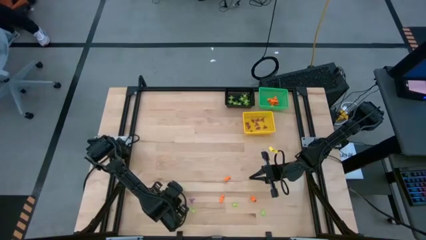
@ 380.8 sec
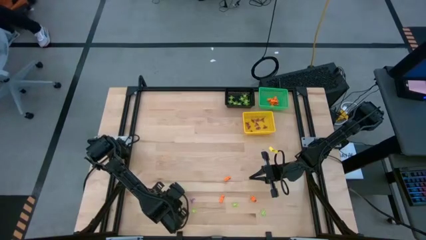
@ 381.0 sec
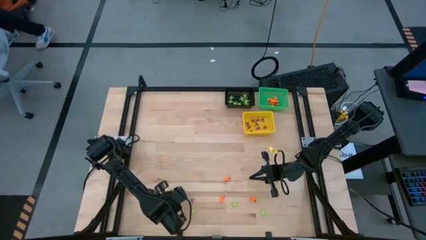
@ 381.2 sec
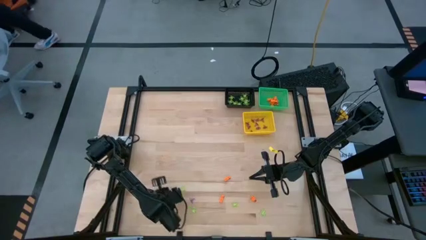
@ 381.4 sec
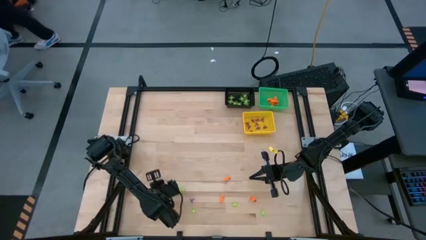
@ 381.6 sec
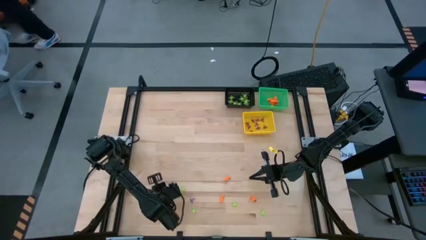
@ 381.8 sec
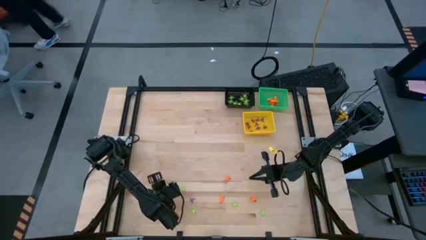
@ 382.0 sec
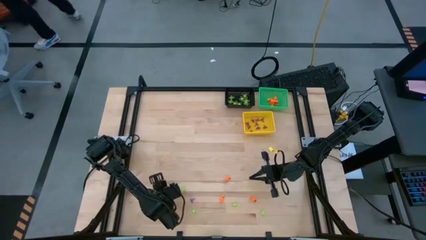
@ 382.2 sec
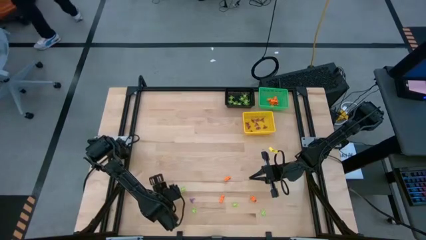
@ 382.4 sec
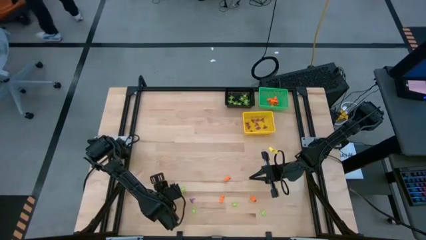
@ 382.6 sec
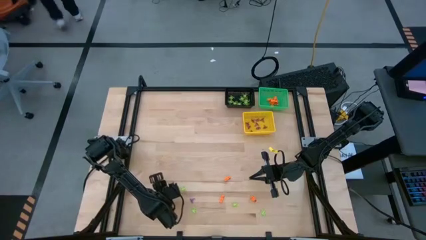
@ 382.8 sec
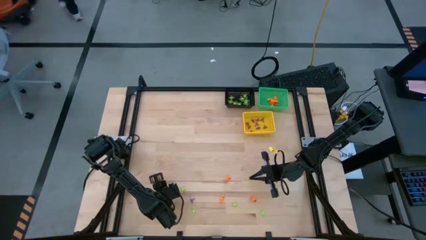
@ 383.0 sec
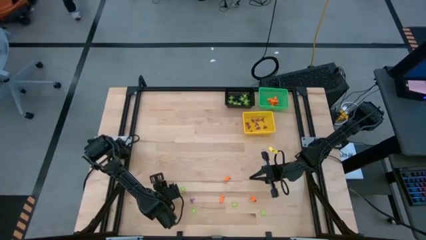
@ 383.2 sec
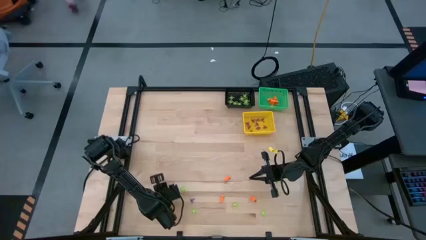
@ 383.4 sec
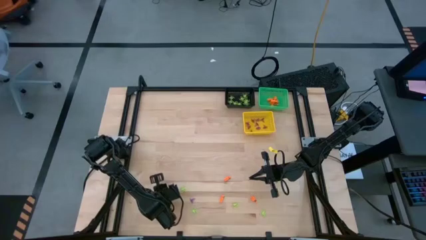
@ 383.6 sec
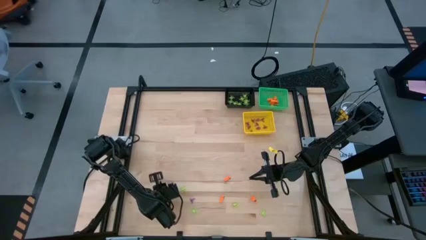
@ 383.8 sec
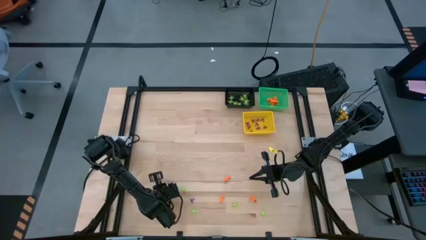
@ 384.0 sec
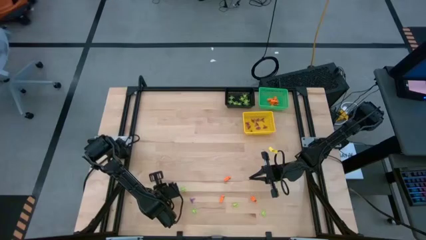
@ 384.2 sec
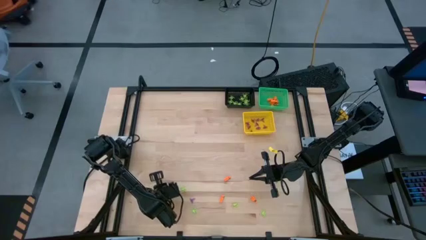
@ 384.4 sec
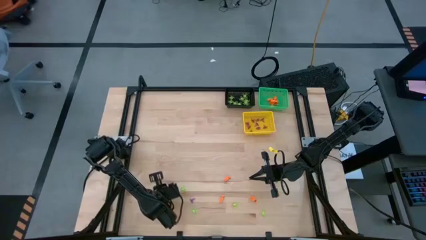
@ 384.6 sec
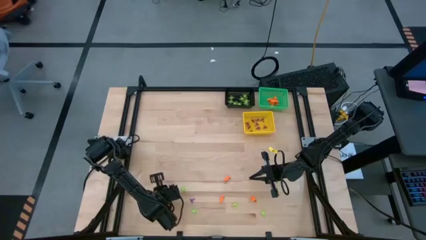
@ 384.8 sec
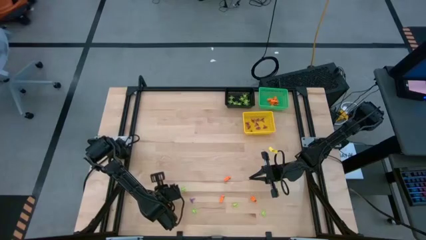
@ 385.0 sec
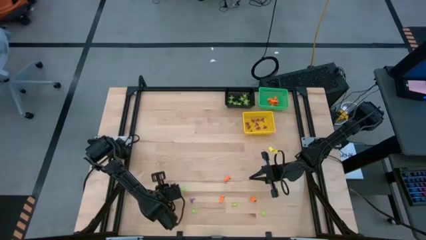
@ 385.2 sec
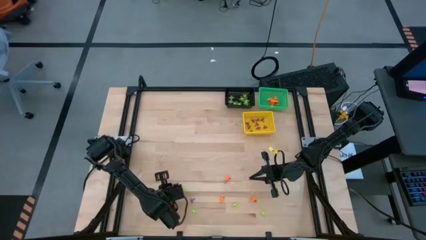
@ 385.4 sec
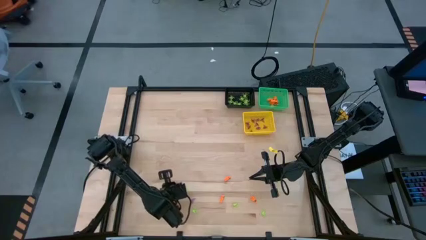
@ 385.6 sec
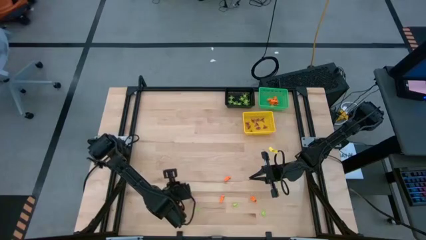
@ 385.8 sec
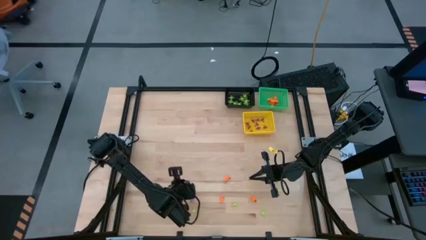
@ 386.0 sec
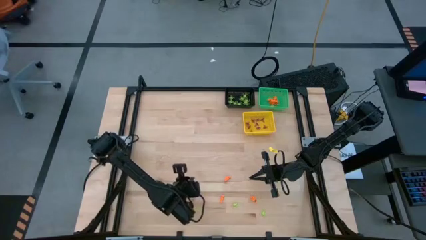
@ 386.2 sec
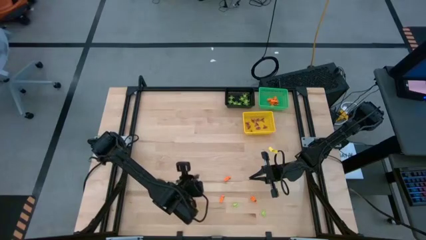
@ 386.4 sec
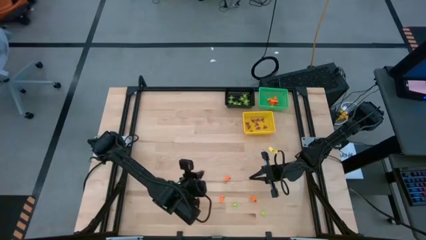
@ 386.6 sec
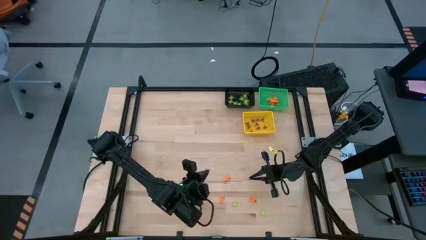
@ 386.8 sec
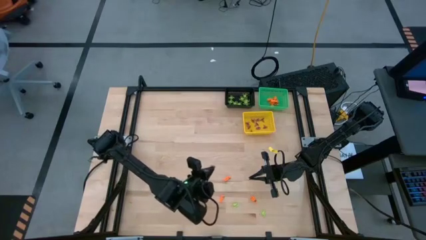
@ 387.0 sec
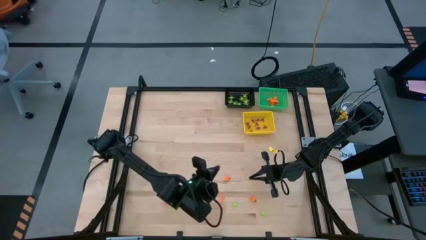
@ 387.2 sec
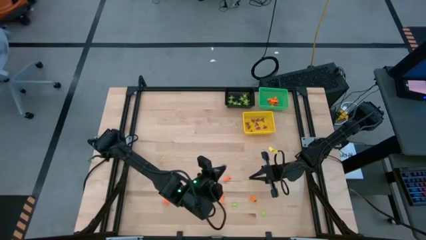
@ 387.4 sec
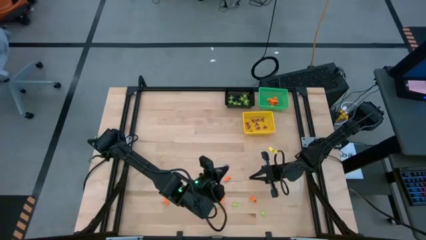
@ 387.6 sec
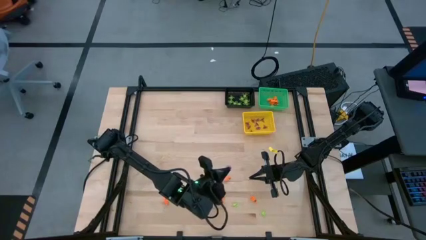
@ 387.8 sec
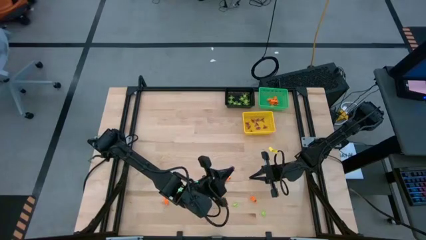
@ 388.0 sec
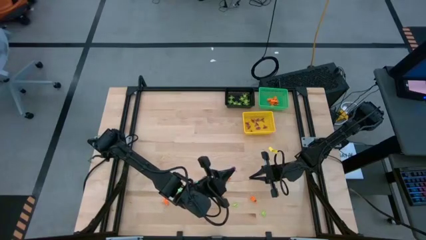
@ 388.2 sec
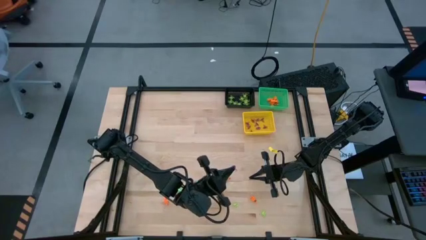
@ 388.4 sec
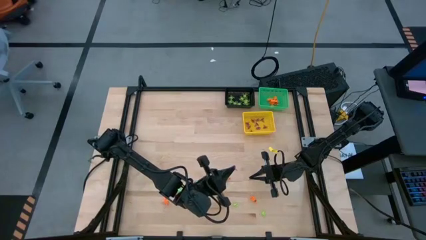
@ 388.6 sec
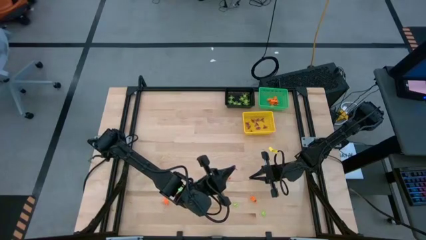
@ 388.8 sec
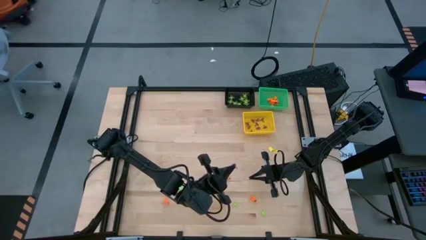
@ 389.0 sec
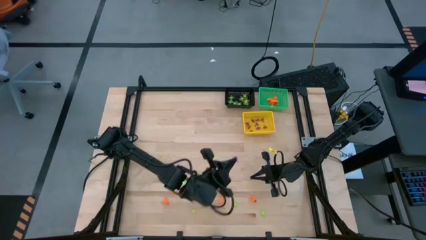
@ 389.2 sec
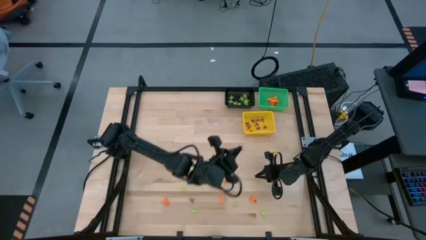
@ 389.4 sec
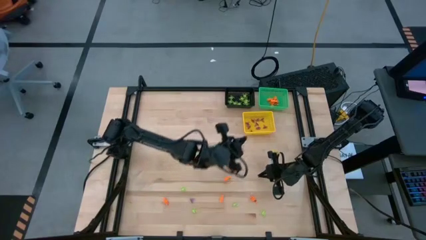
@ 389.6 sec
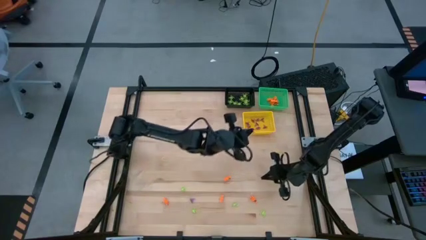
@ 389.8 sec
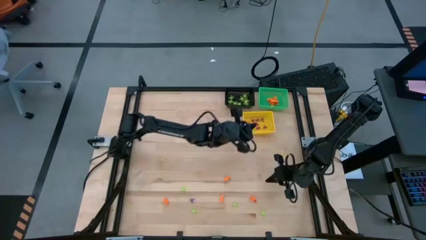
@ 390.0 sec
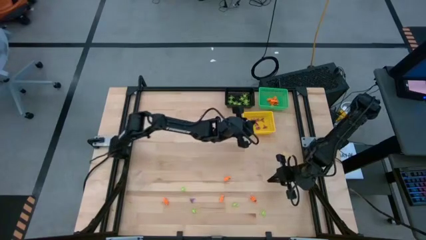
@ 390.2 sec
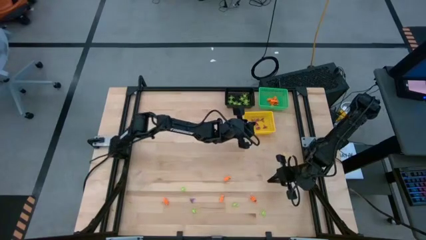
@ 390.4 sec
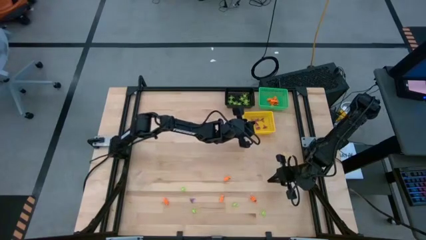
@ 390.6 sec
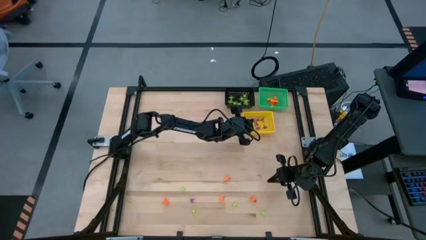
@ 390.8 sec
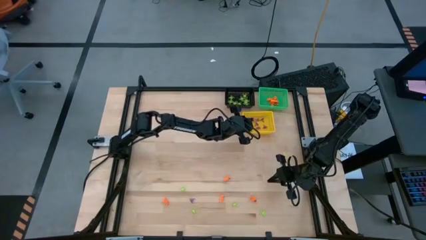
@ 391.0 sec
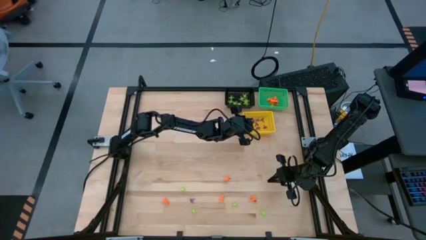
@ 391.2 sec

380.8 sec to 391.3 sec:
Task: Sort Halloween decoration
Put the violet witch hat toy into the yellow basket

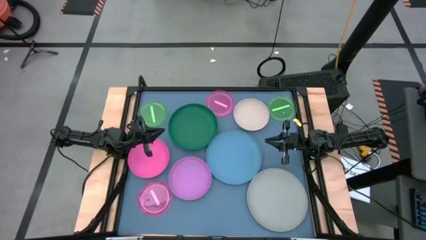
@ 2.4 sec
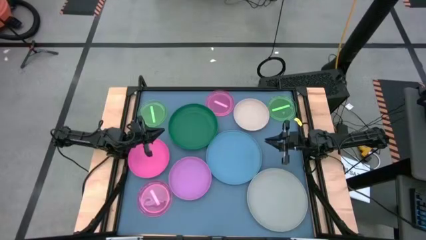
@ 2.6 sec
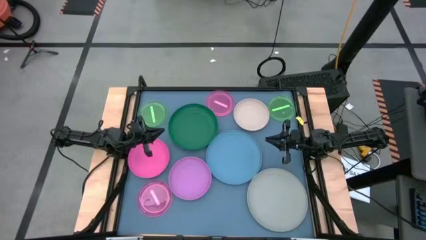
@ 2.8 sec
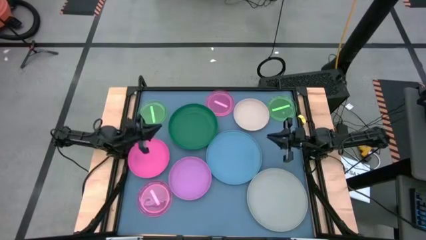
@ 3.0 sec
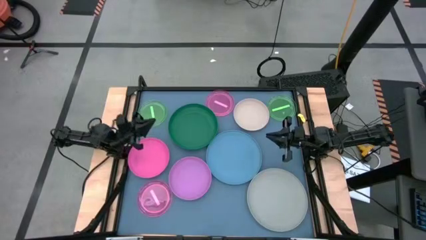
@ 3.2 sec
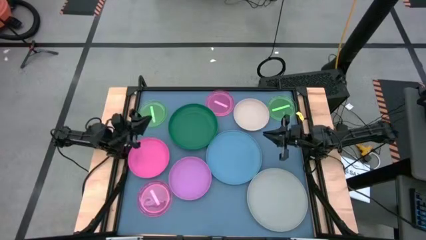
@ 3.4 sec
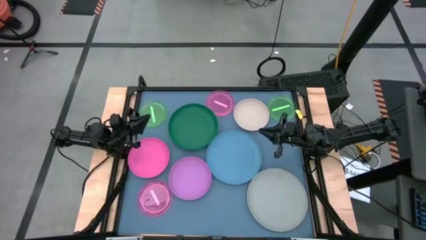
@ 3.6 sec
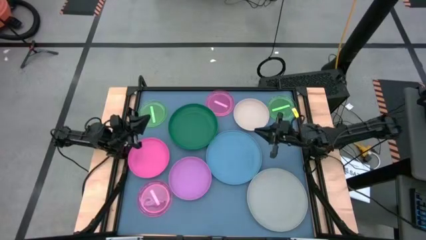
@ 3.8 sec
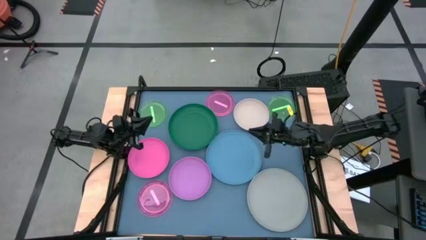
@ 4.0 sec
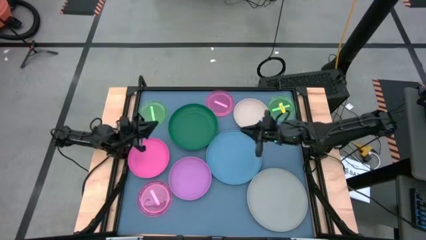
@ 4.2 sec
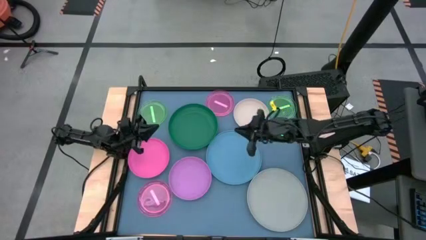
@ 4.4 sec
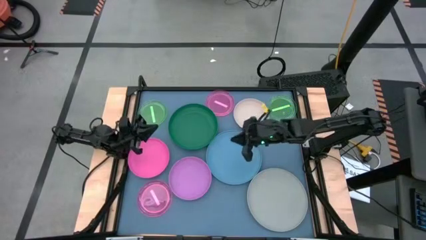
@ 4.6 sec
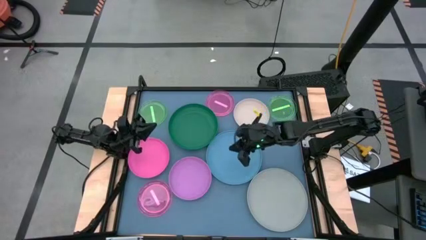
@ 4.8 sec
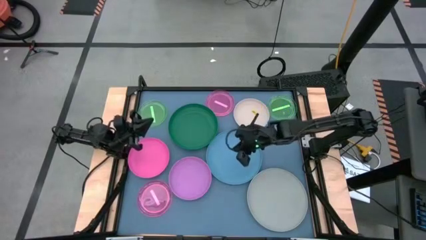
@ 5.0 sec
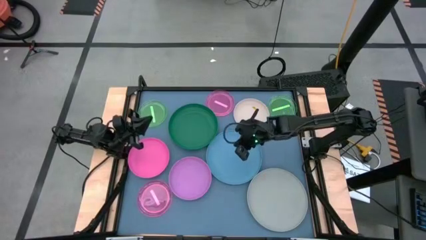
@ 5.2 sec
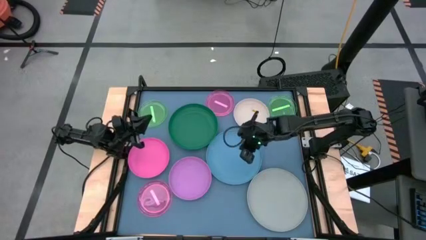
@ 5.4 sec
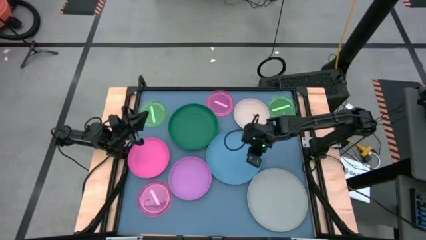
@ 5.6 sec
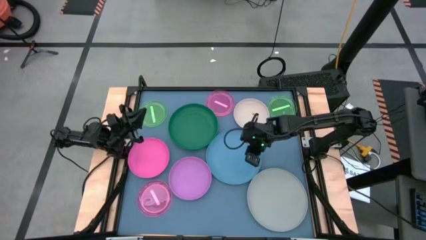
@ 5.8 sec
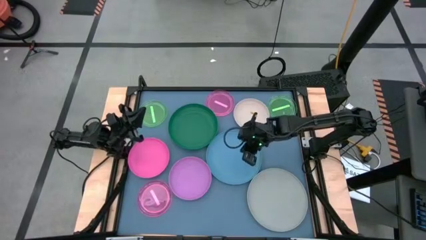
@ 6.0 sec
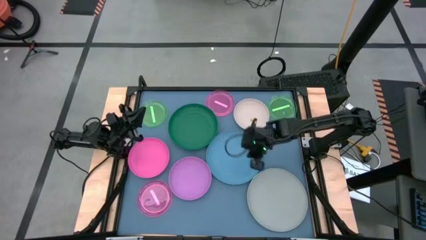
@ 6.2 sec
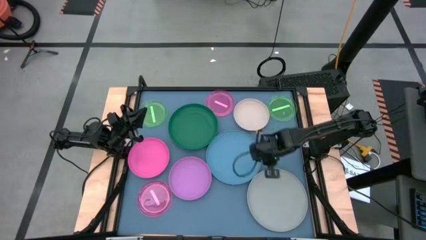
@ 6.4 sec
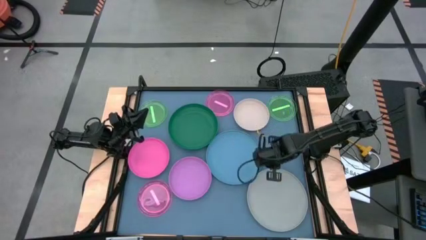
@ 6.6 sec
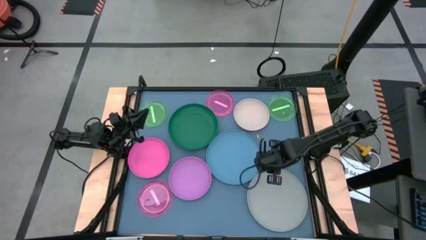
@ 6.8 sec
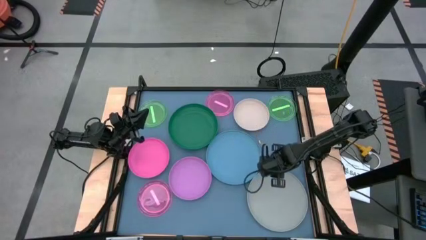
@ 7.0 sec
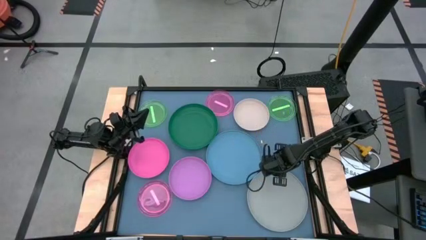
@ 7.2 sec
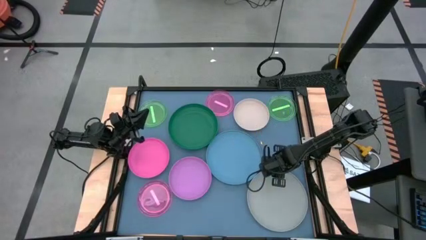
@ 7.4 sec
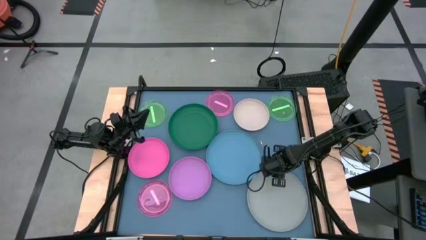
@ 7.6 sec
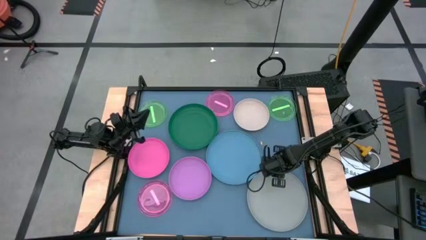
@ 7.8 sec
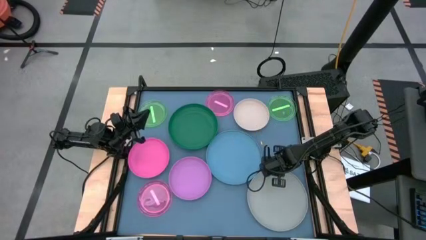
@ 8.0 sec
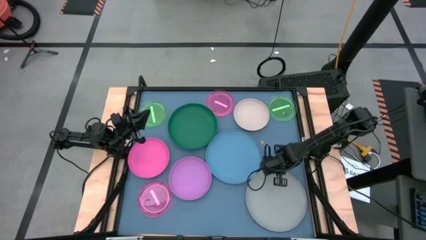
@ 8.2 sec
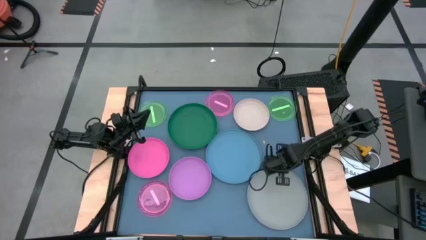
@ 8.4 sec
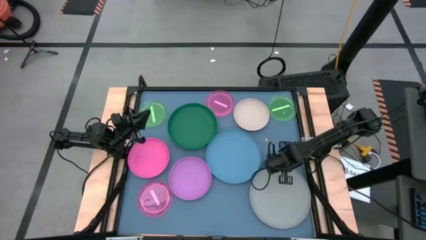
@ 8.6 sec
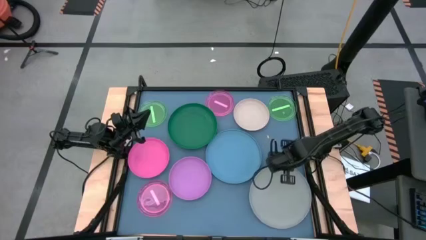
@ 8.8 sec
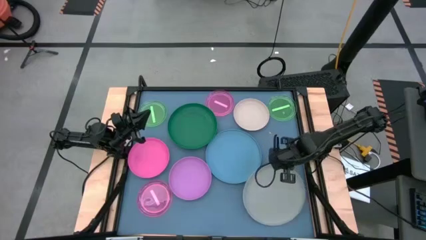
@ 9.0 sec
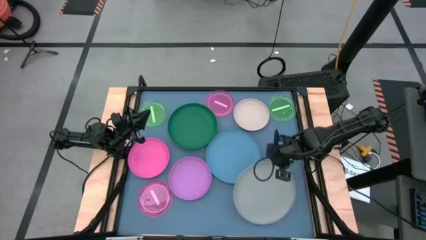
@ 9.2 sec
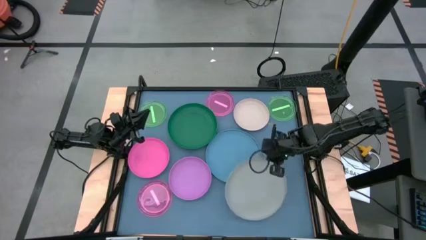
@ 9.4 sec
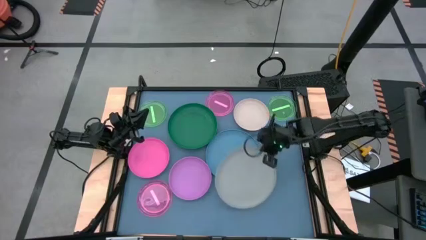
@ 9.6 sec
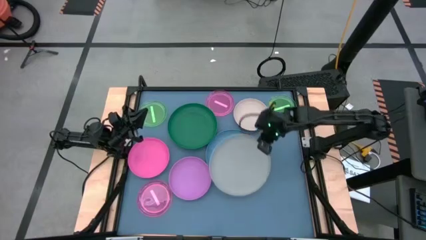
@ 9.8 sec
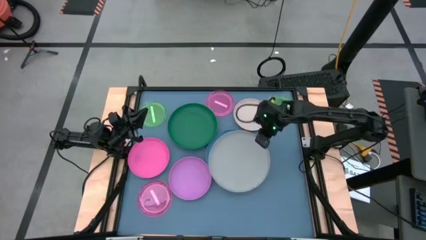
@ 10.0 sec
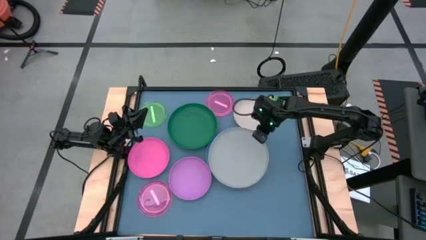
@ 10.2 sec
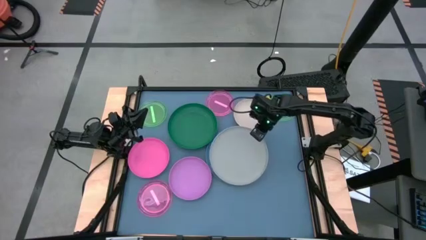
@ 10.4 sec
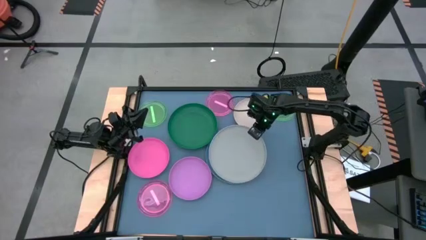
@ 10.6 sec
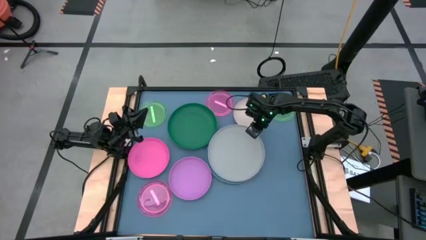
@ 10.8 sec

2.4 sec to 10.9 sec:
Task: Stack plastic plates
Stack the gray plate on top of the blue plate
